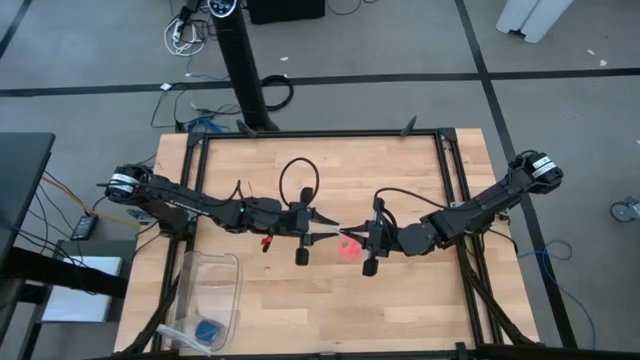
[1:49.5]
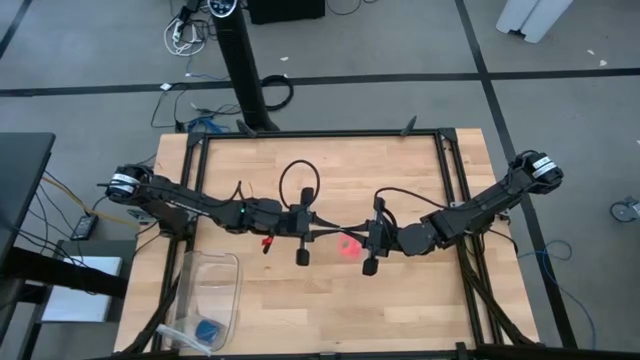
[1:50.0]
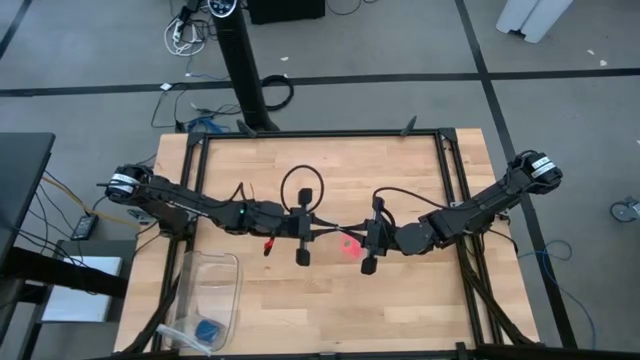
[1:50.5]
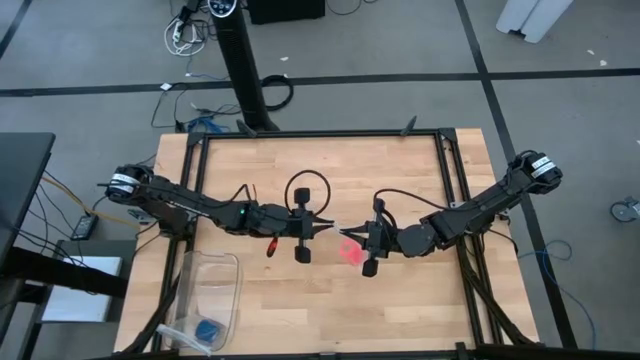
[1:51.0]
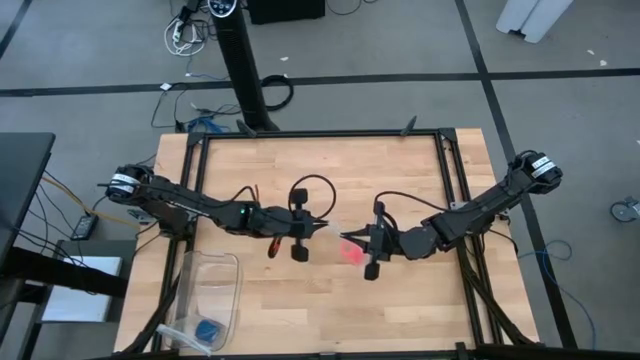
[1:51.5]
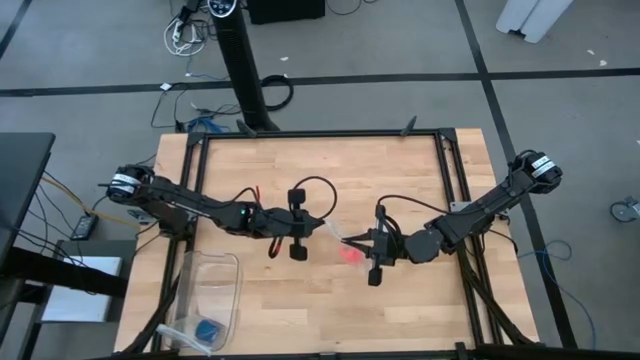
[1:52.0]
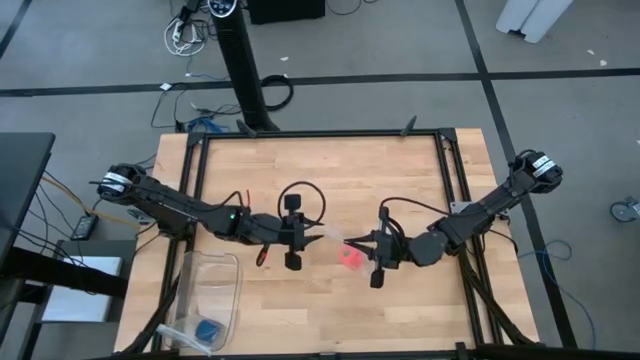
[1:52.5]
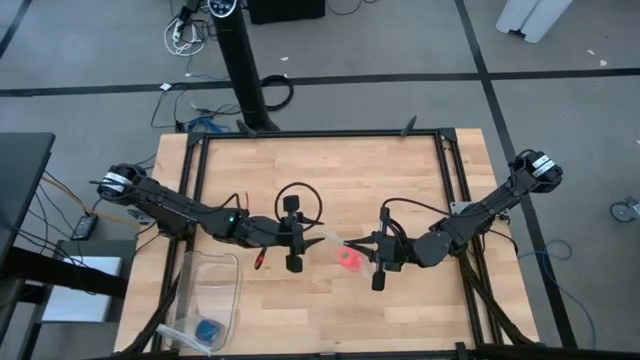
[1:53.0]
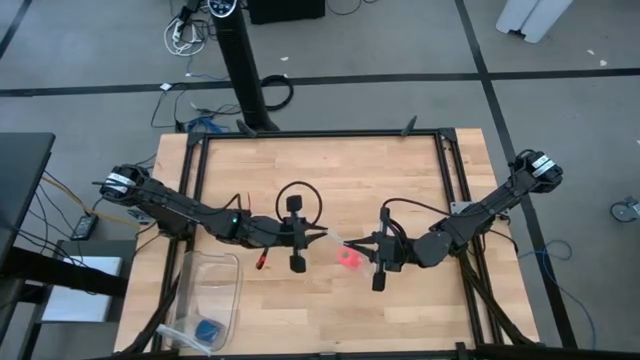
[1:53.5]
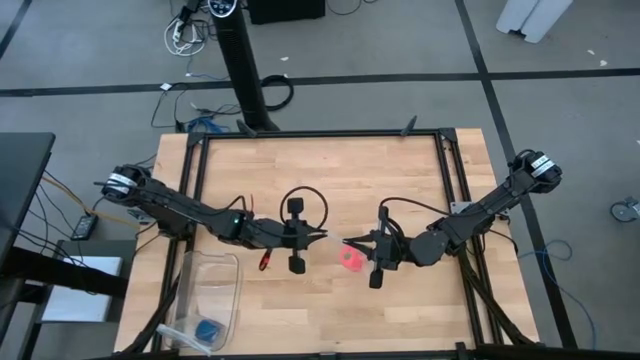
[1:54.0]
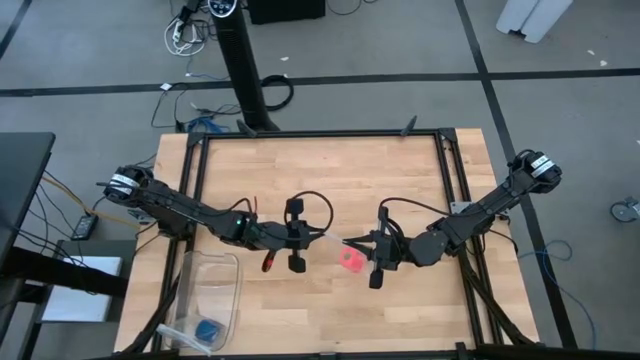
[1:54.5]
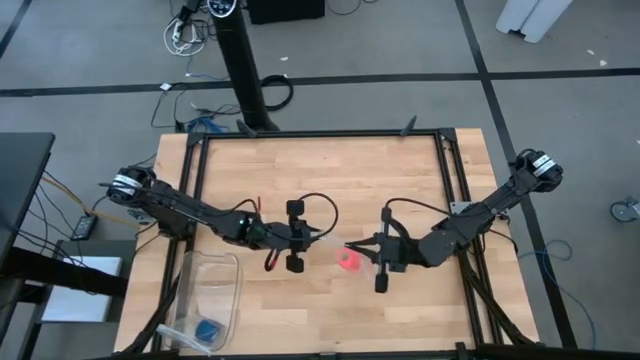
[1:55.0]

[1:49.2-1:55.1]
Task: Roll bandage
Close the zip lock bag

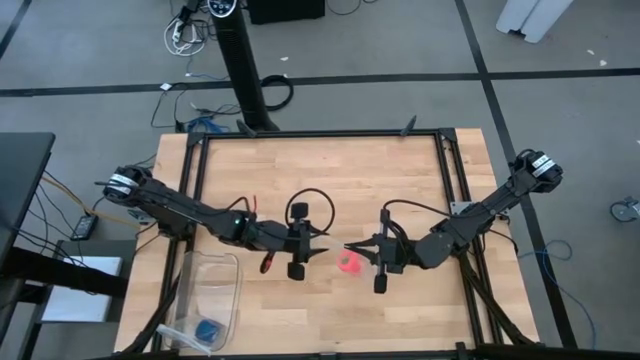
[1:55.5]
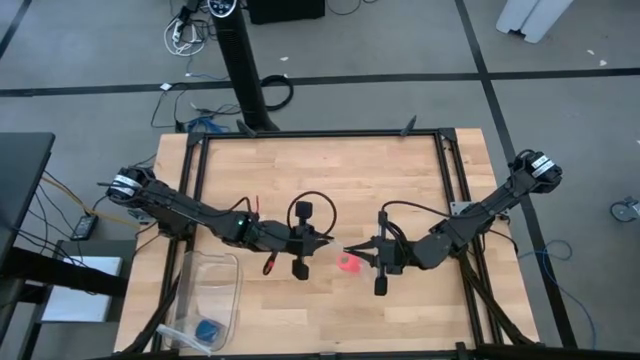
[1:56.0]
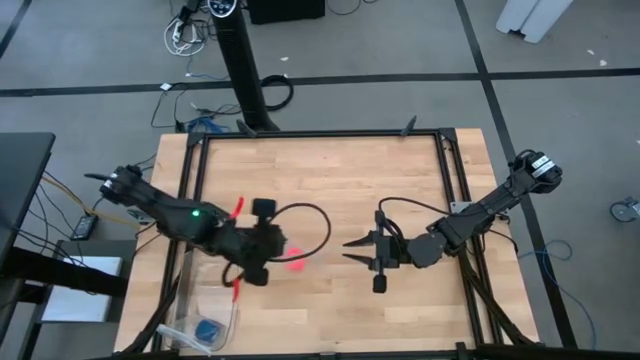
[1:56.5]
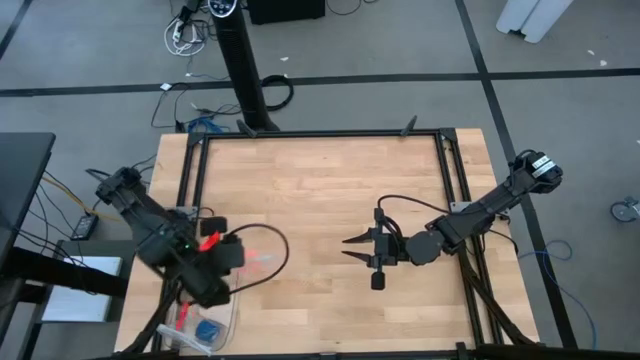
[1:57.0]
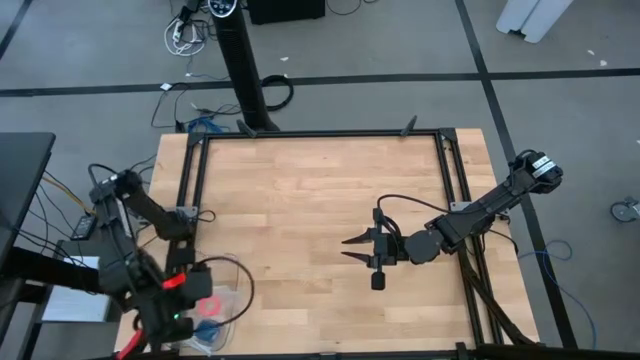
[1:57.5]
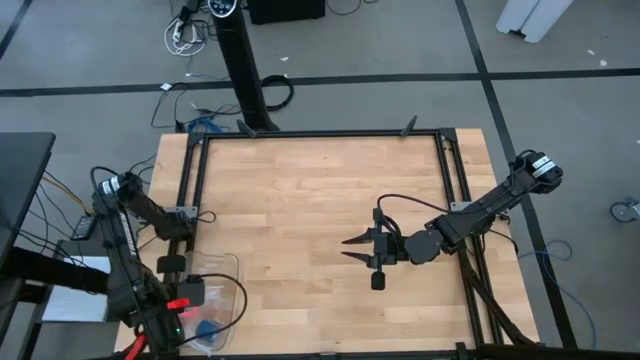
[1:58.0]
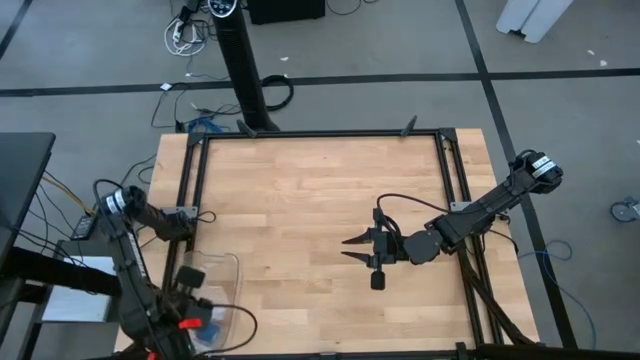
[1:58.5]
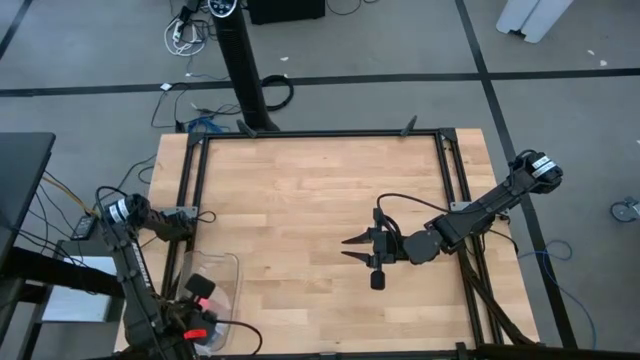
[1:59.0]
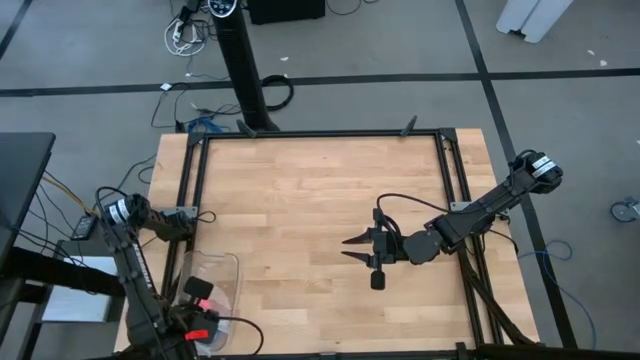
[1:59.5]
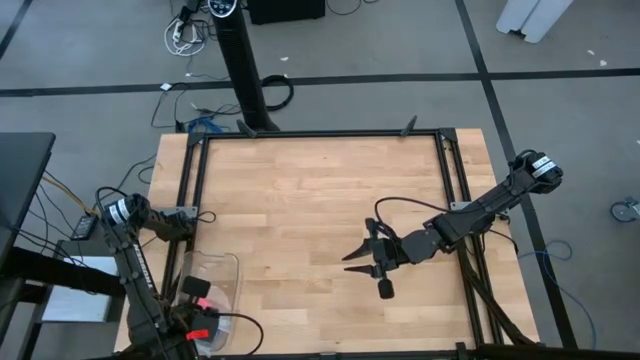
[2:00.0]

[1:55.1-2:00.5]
Put the packed rolled pink bandage into the transparent bin

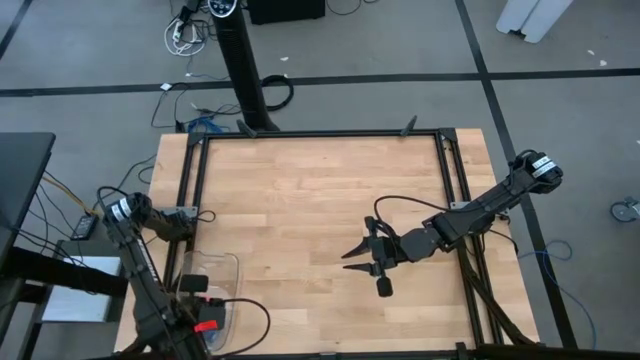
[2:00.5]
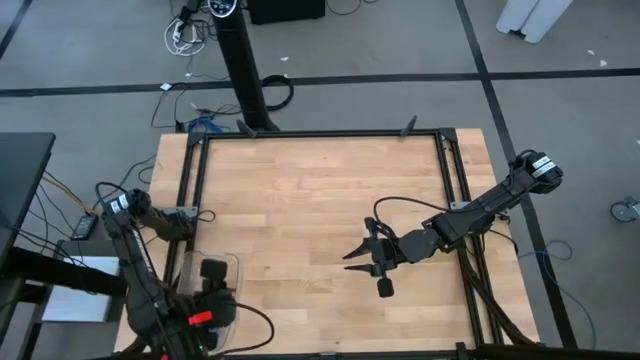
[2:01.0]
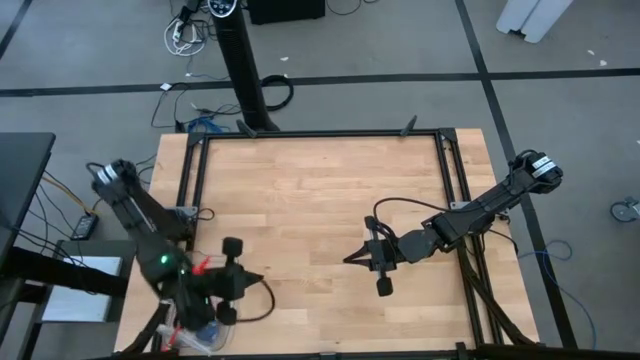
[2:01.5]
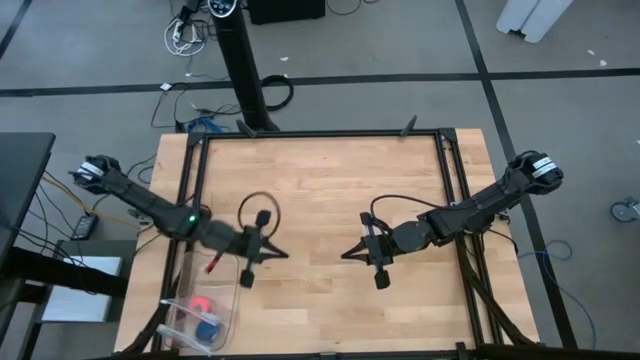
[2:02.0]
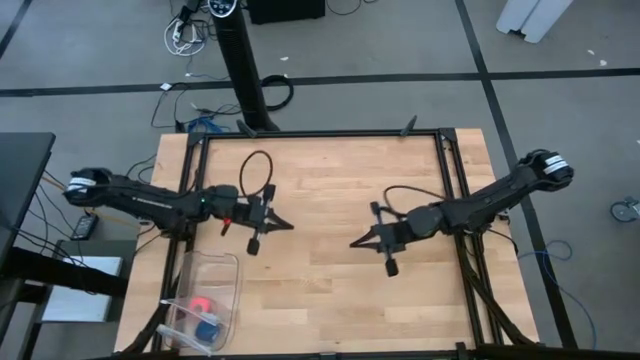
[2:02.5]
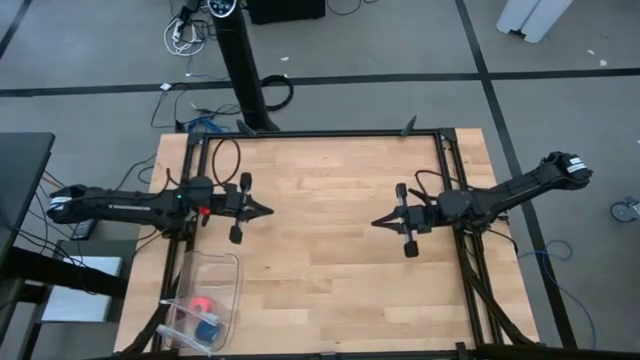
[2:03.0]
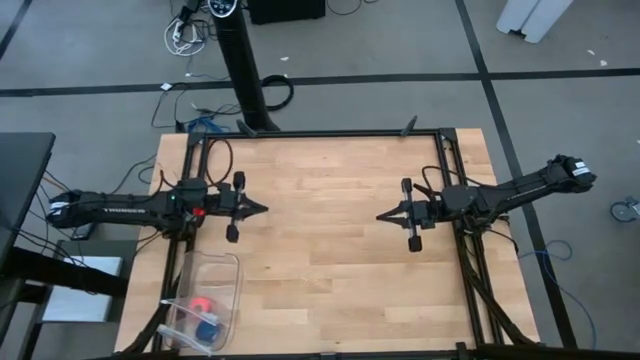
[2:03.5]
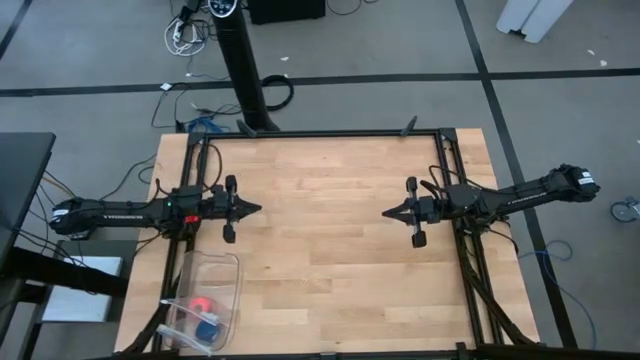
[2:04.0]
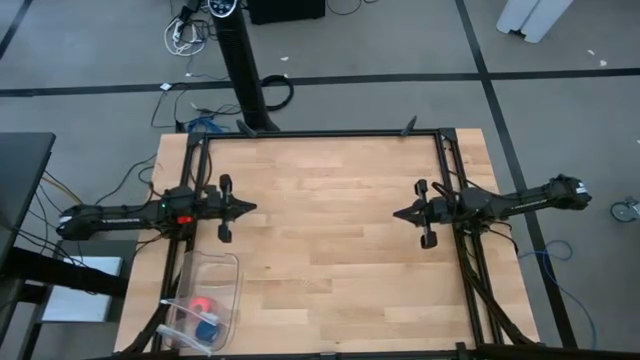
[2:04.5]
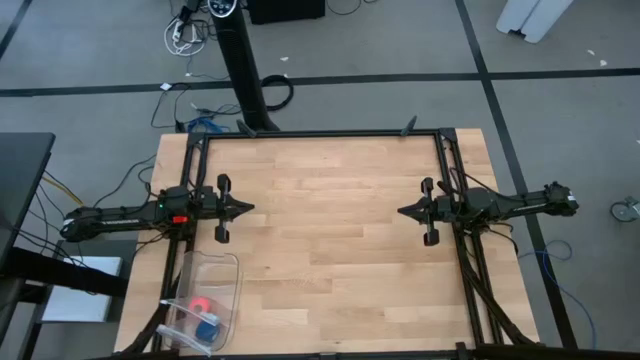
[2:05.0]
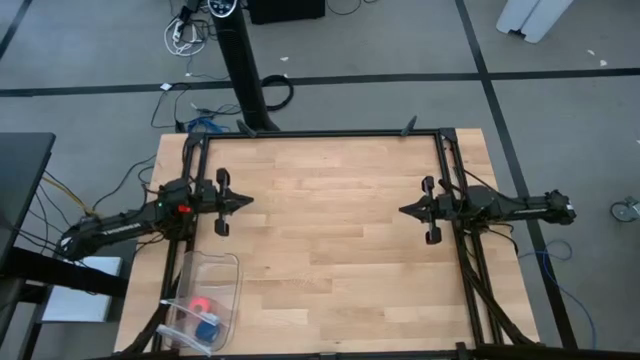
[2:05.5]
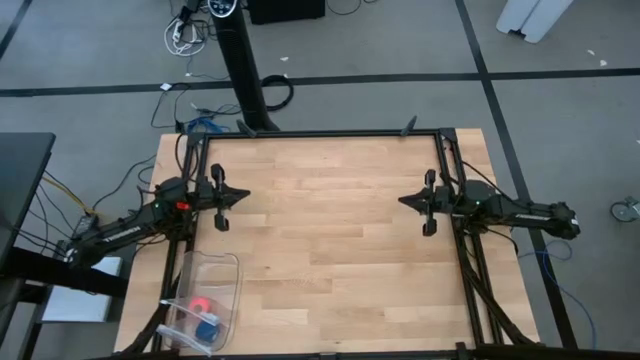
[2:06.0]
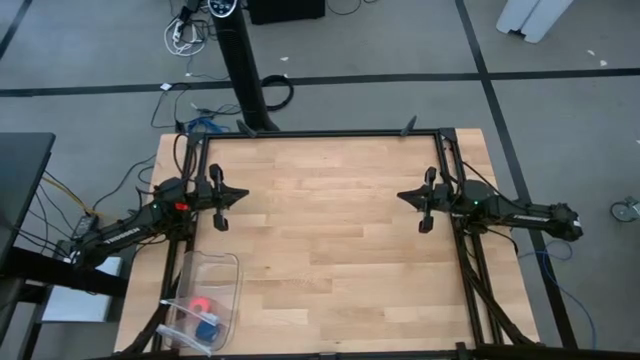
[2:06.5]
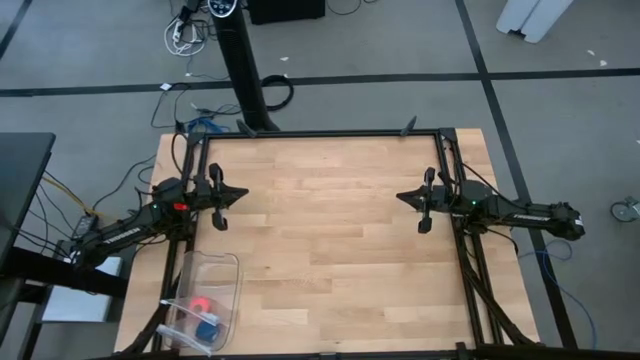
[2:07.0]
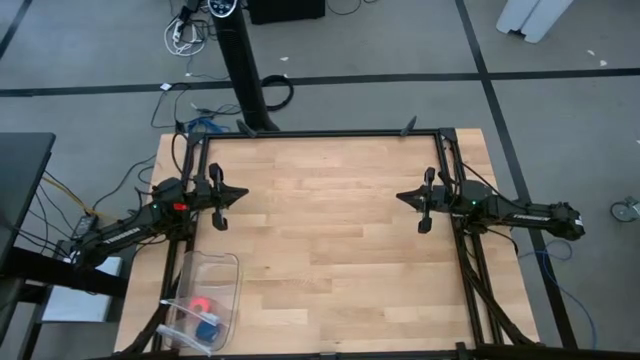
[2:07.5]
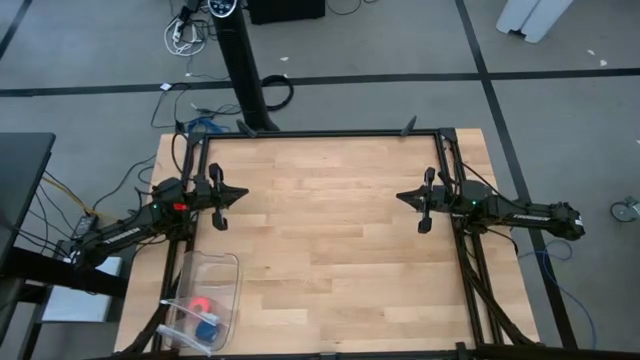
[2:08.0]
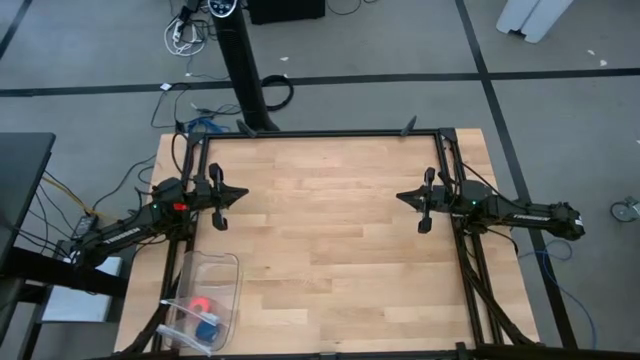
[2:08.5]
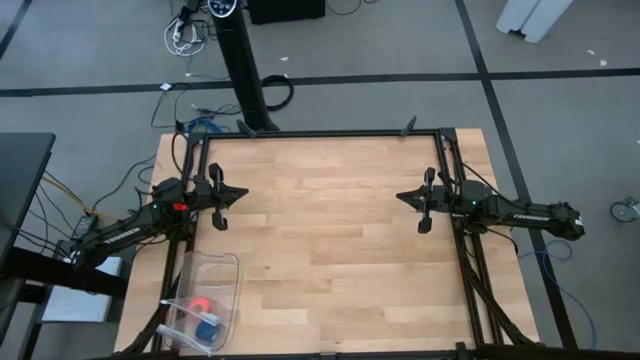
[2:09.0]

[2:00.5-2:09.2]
Return to Home Position

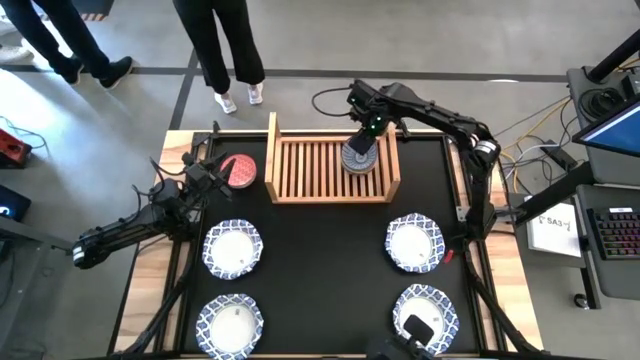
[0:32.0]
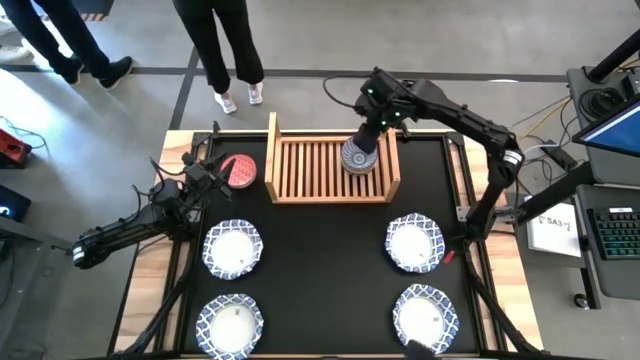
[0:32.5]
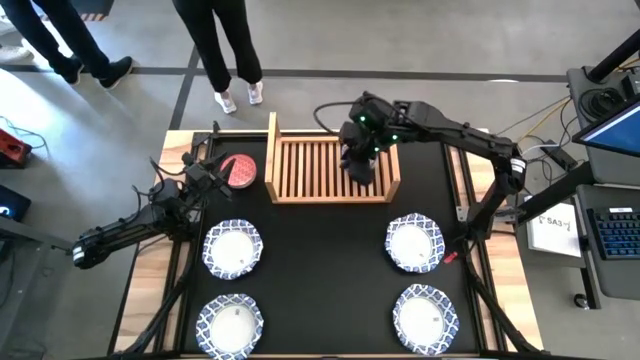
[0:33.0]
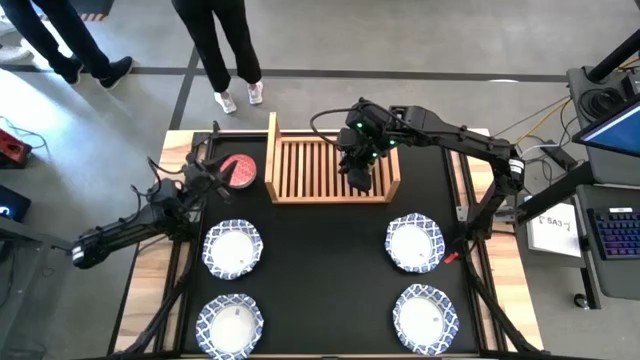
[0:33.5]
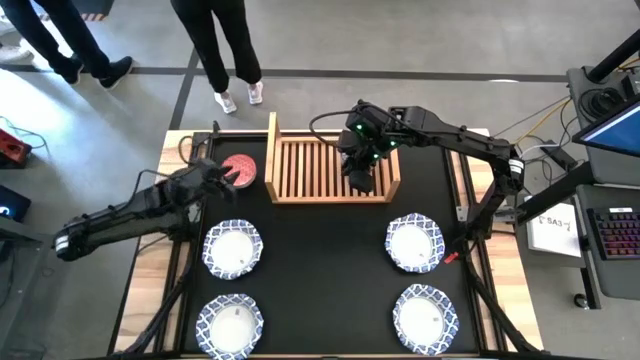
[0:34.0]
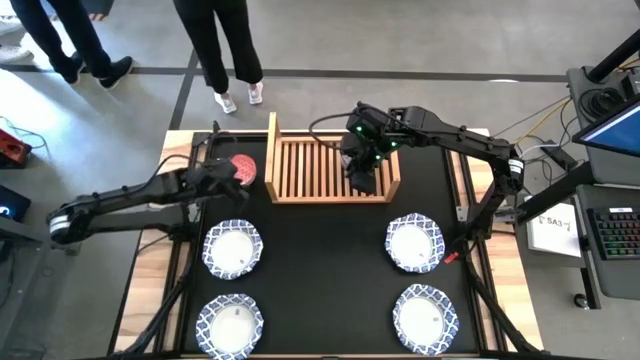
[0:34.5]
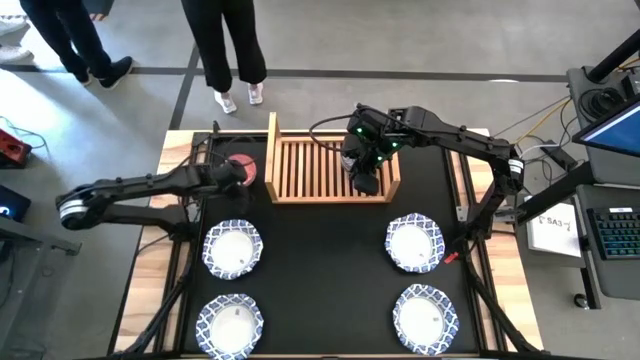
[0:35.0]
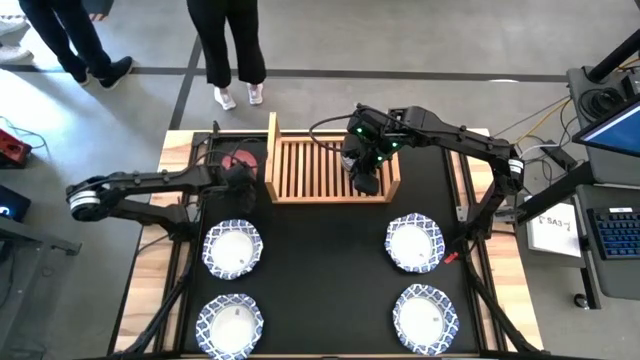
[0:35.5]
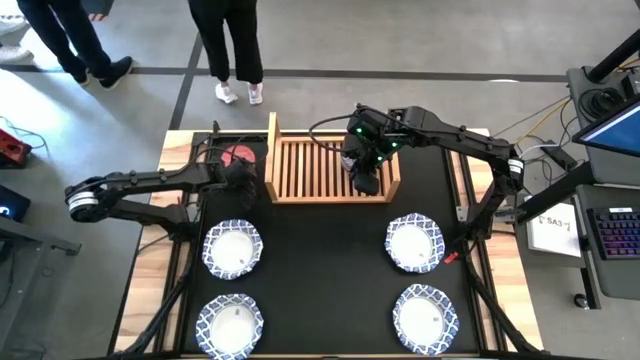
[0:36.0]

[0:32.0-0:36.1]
Task: Place and stack bowls onto a shelf
Stack the red patterned bowl on top of the blue patterned bowl on the shelf
